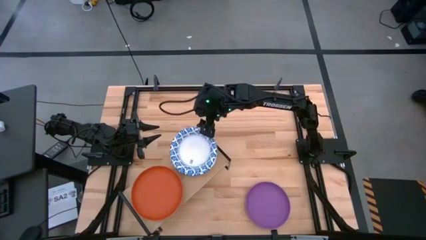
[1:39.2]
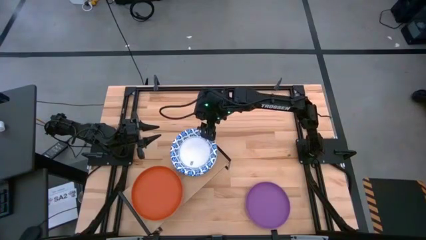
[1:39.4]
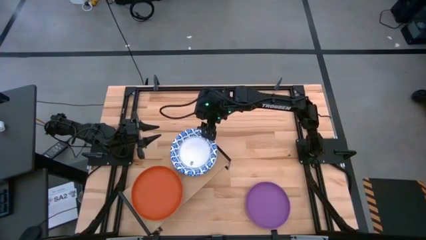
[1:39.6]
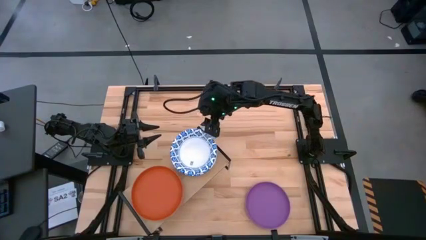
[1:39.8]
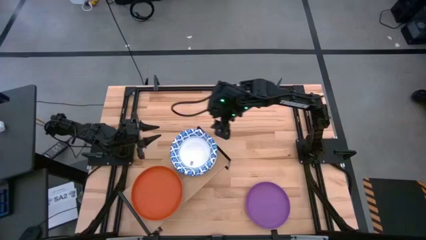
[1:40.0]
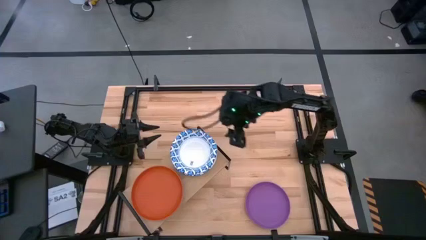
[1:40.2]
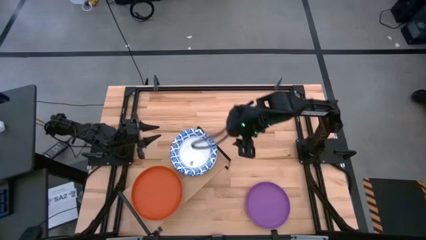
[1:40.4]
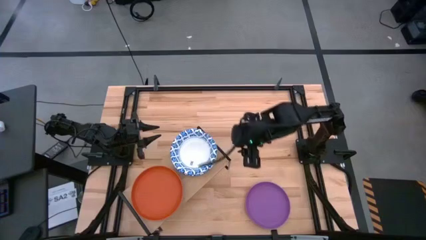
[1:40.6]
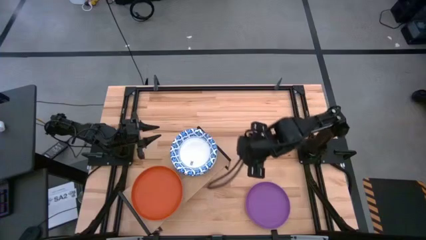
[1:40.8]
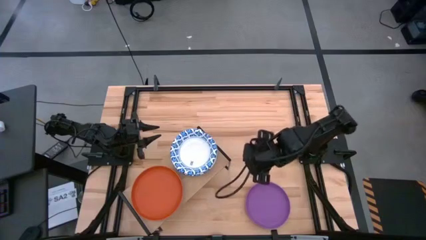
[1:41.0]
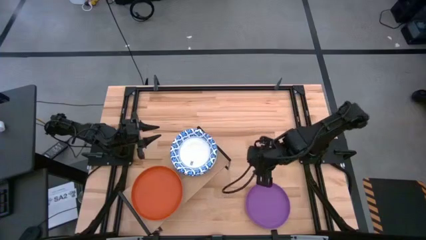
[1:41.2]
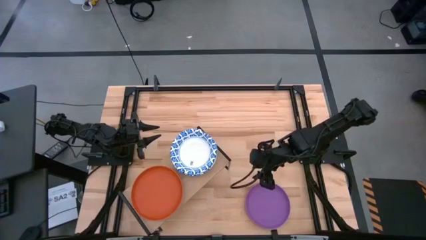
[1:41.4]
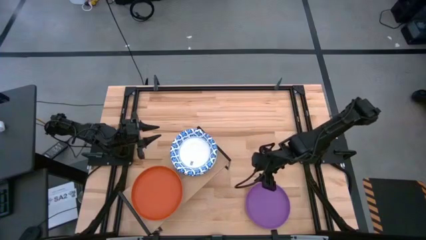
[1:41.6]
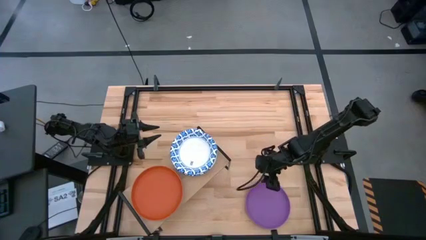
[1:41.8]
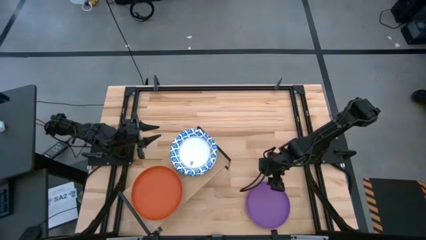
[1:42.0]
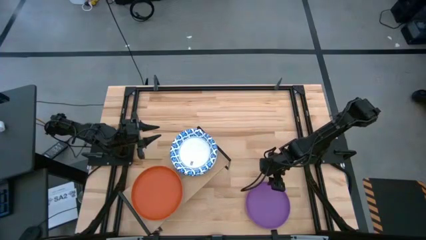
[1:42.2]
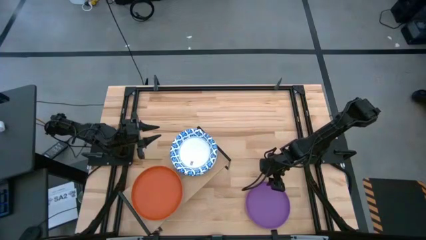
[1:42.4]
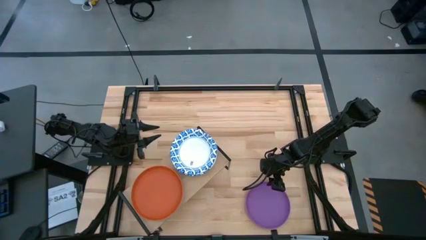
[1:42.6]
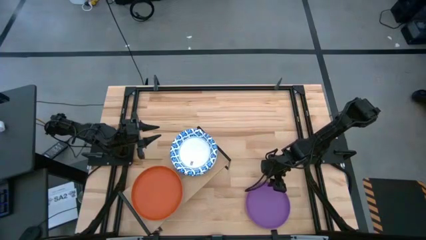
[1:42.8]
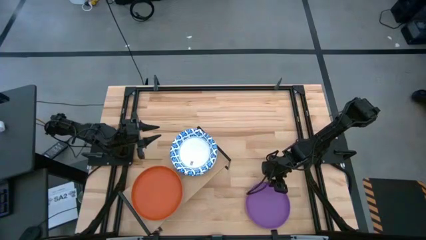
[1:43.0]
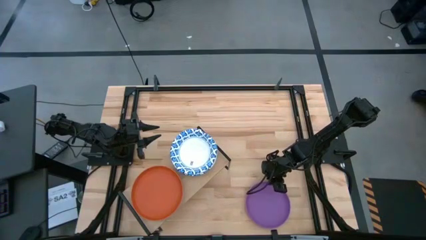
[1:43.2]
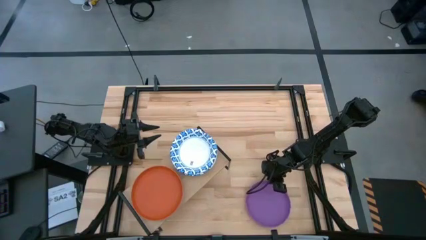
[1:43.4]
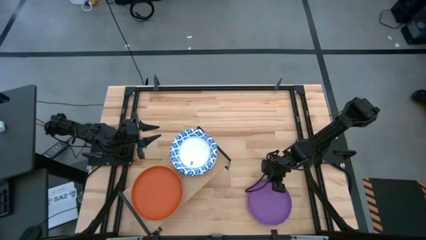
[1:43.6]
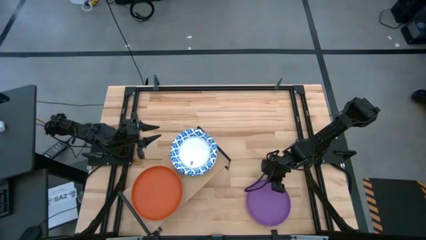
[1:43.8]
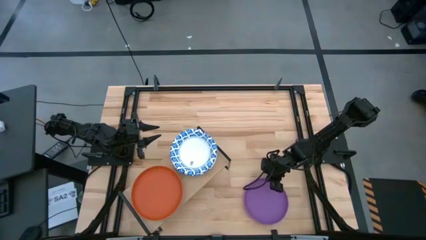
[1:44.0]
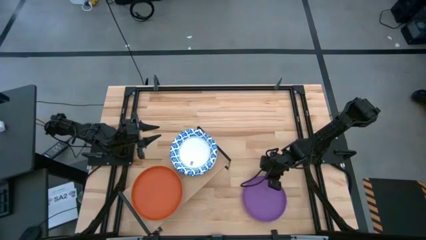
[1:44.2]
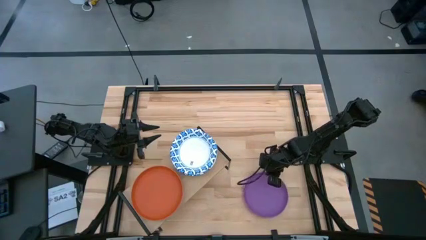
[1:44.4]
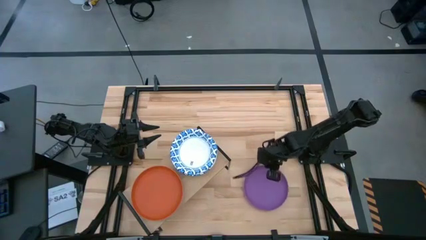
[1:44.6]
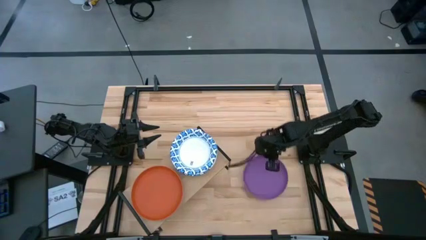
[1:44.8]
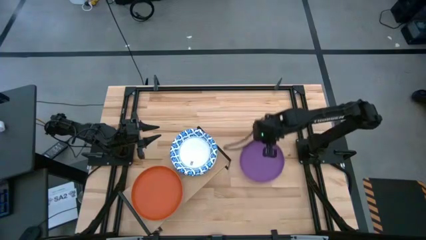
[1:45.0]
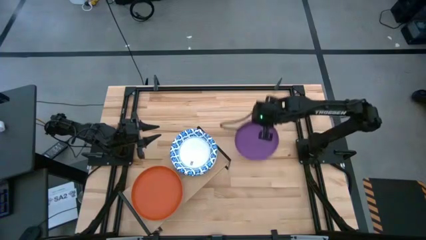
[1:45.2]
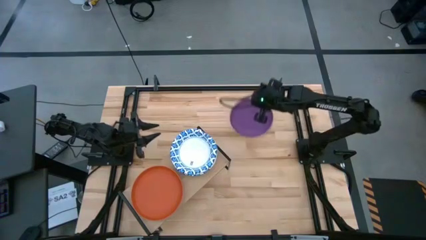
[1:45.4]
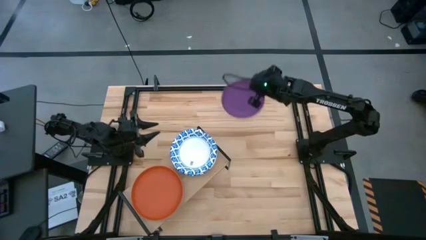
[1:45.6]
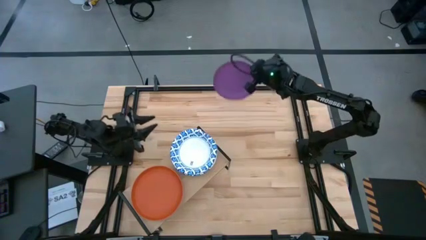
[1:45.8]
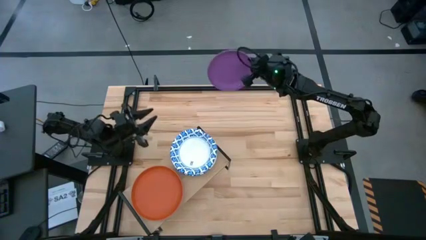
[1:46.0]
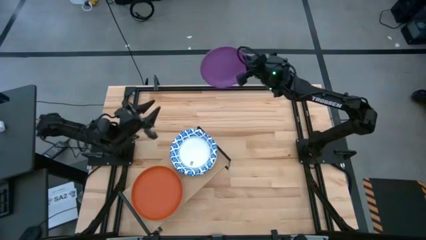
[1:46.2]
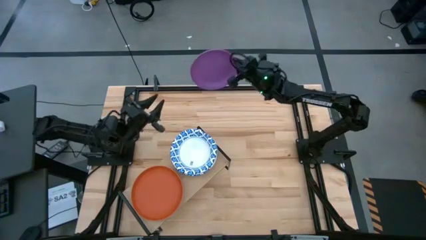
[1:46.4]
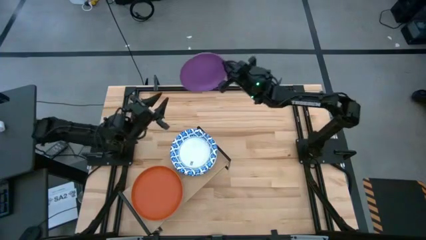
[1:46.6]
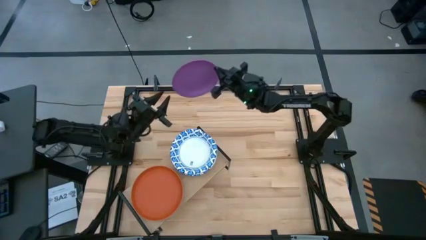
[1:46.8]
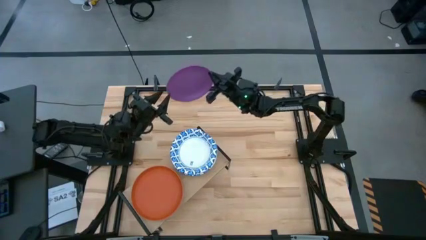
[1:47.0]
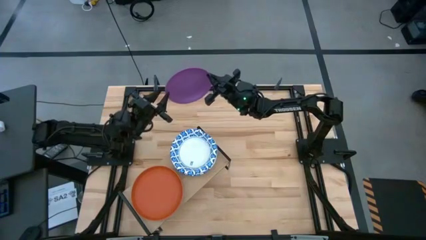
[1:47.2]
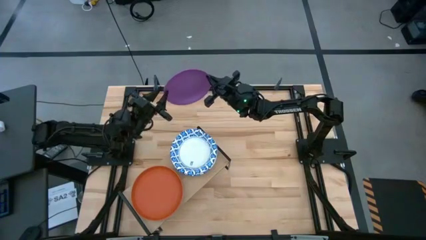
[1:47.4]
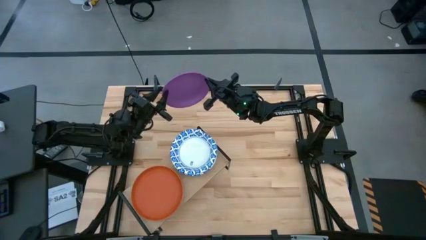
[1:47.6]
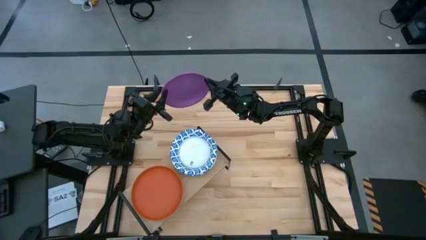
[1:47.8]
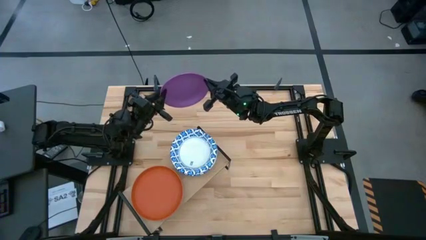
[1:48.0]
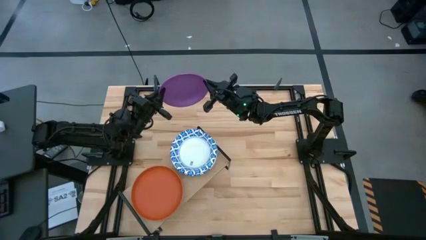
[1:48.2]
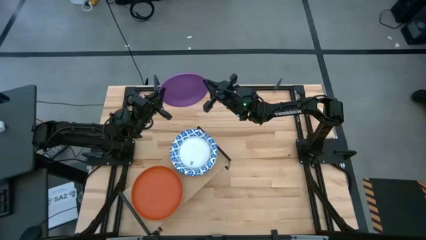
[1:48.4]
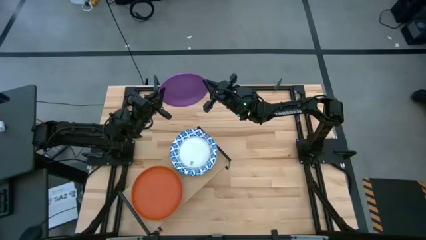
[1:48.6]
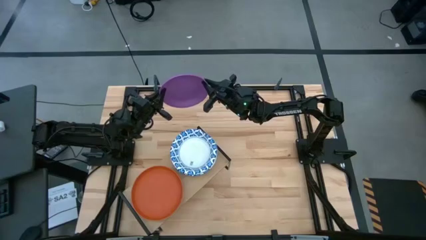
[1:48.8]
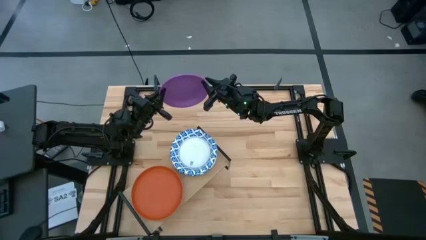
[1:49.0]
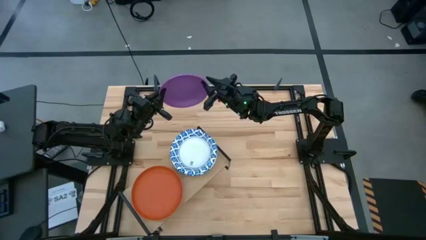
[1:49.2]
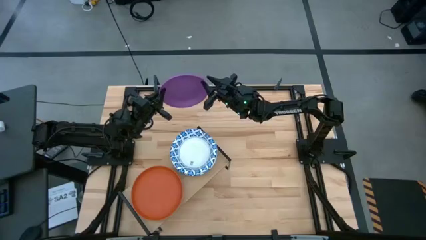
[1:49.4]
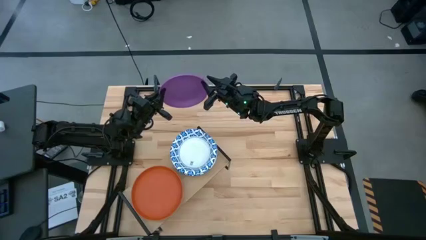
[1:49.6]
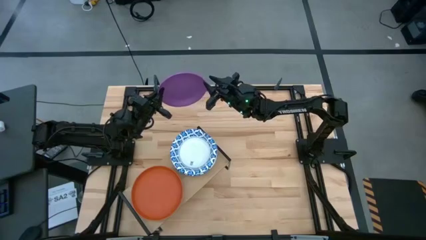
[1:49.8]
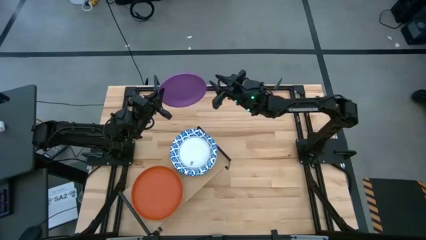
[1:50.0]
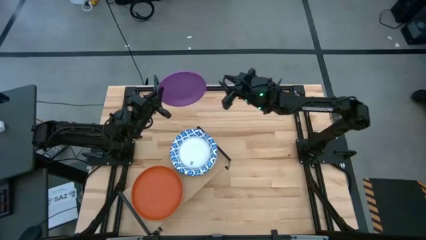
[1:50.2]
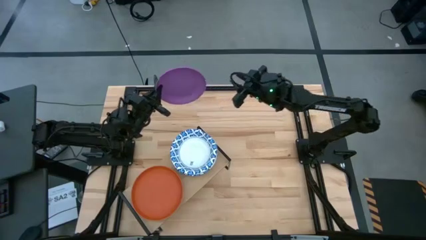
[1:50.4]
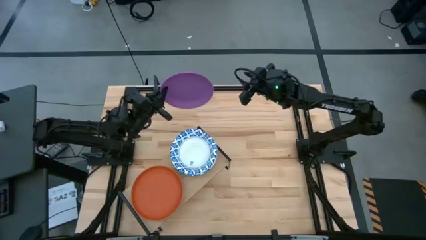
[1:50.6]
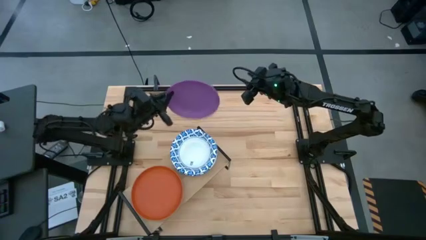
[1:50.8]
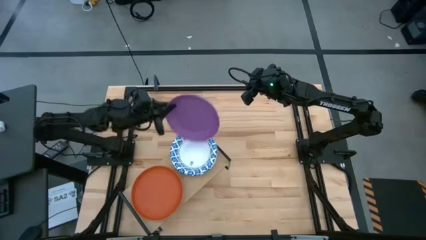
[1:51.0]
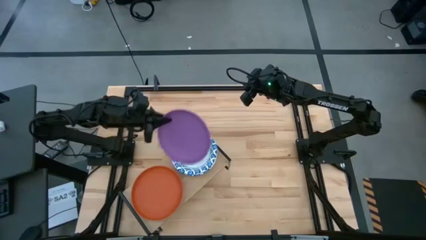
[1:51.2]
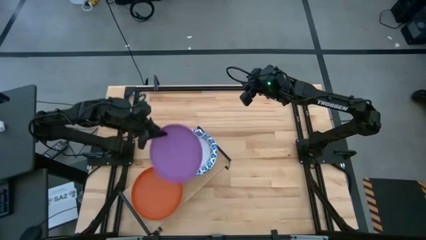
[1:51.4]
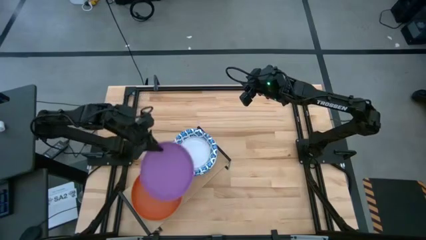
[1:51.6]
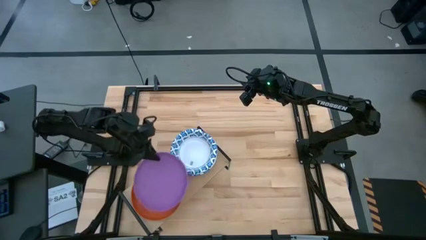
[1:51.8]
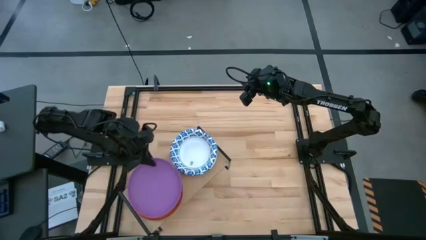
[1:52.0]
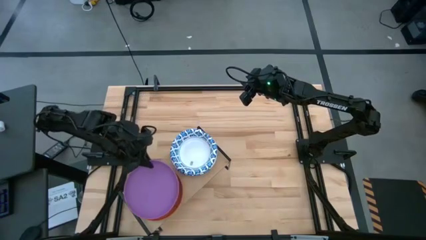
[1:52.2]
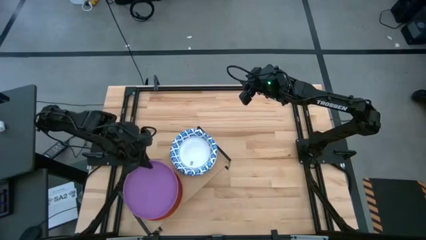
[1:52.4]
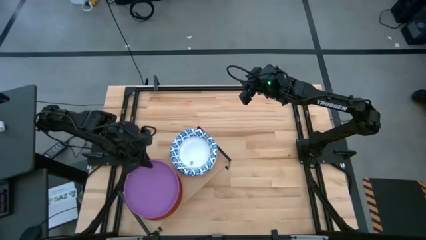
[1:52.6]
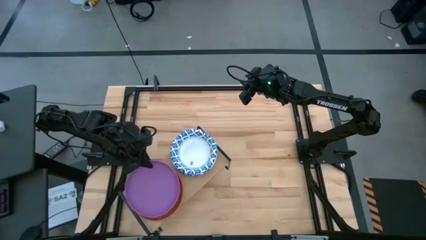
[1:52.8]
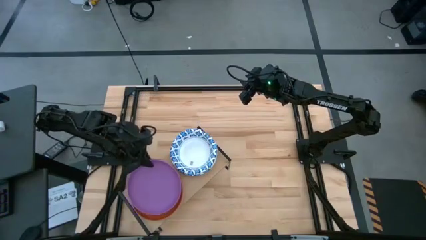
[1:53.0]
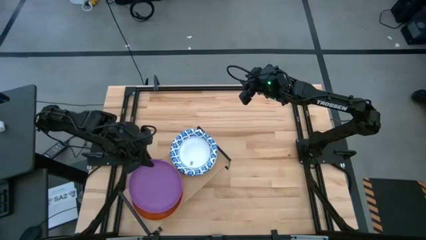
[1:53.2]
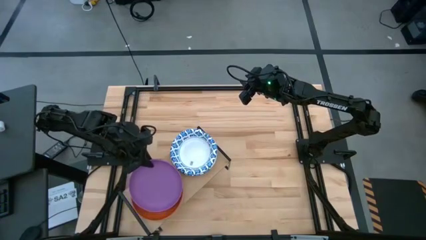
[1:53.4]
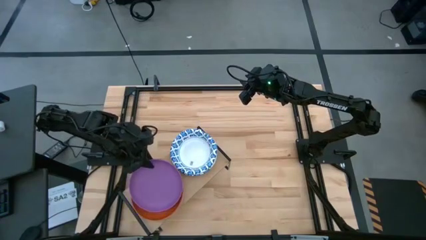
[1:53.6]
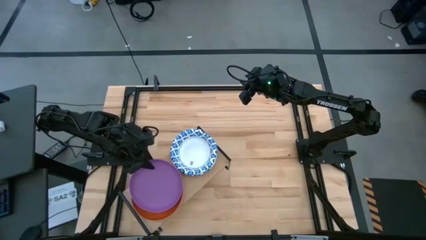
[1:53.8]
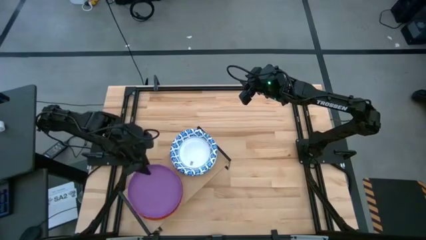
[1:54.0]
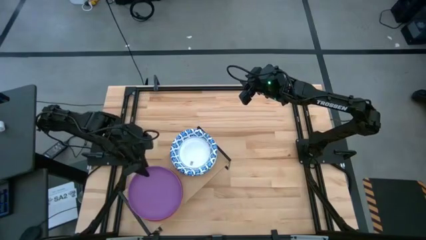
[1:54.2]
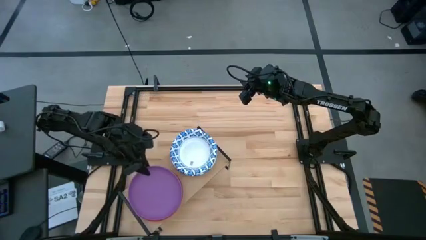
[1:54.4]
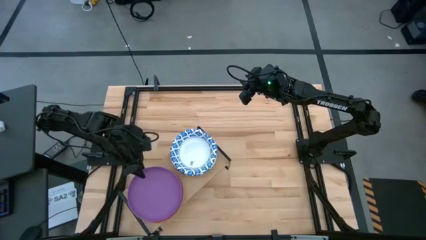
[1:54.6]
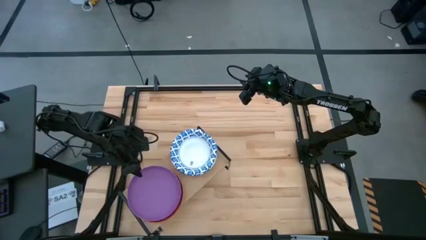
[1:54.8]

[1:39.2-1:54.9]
Task: Place and stack plates onto a shelf
Stack the violet plate on top of the orange plate on the shelf
